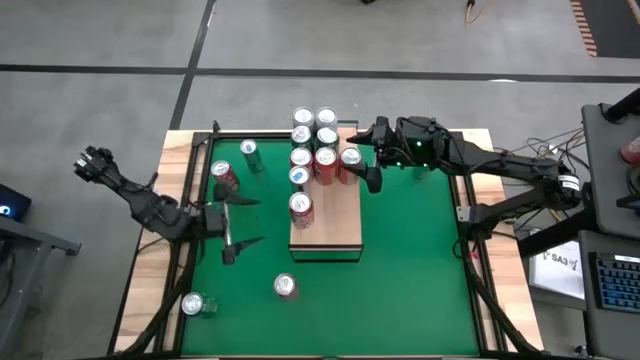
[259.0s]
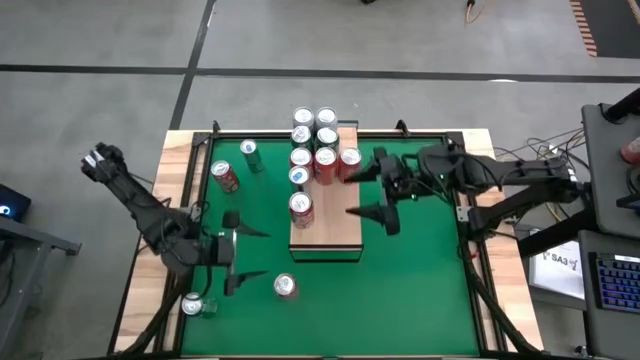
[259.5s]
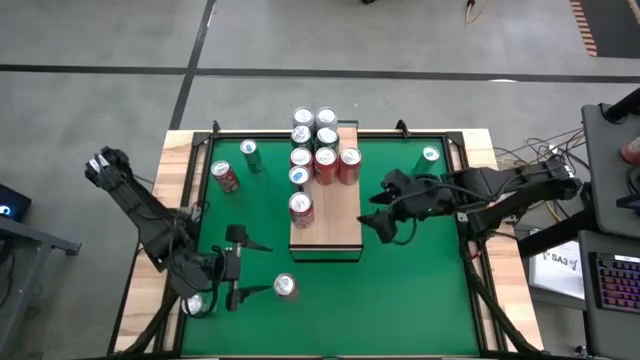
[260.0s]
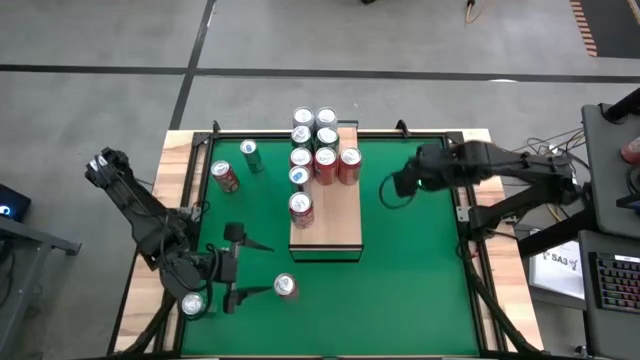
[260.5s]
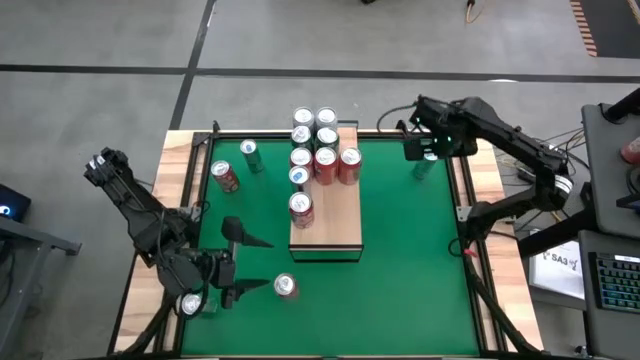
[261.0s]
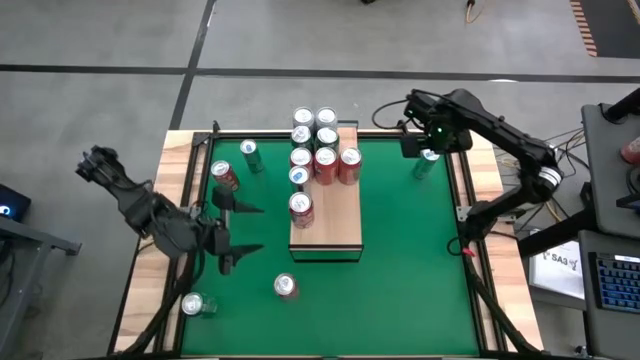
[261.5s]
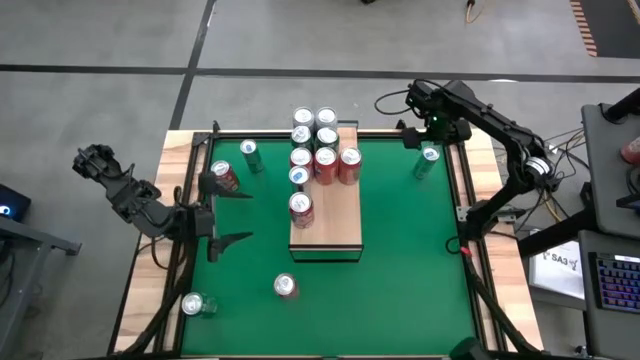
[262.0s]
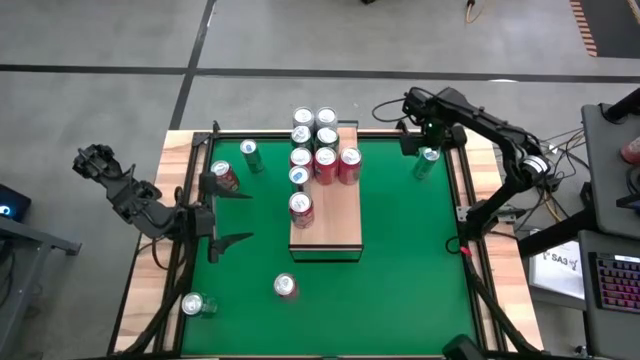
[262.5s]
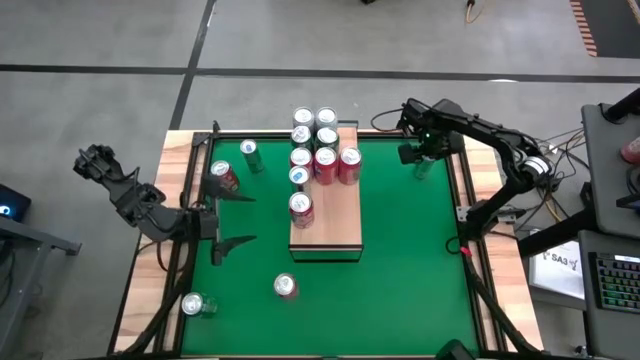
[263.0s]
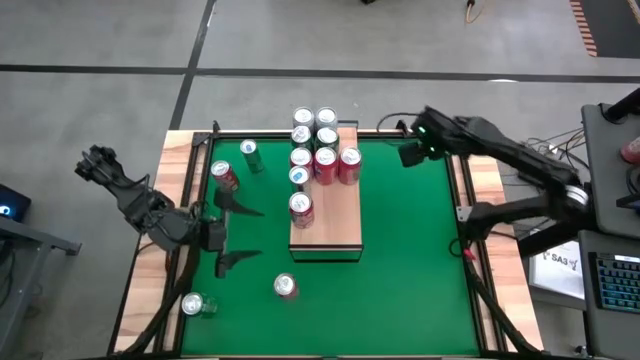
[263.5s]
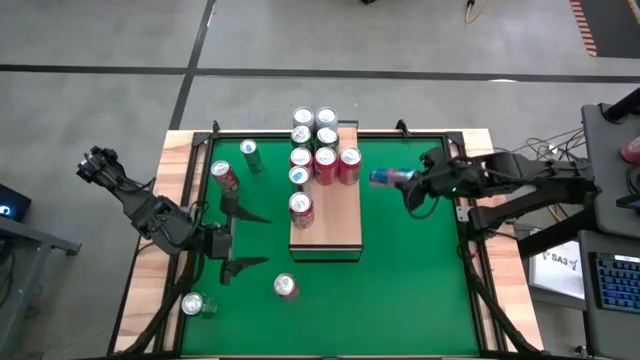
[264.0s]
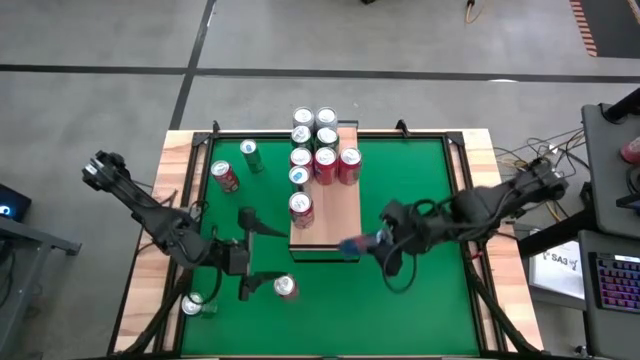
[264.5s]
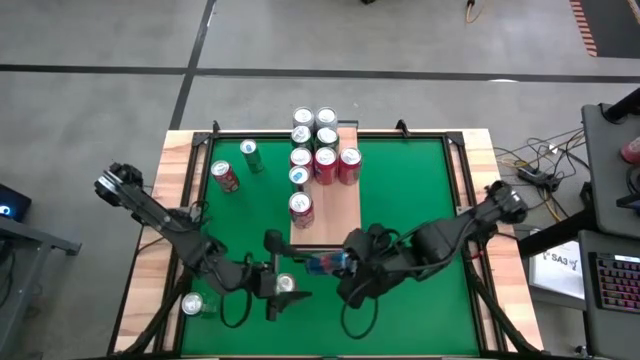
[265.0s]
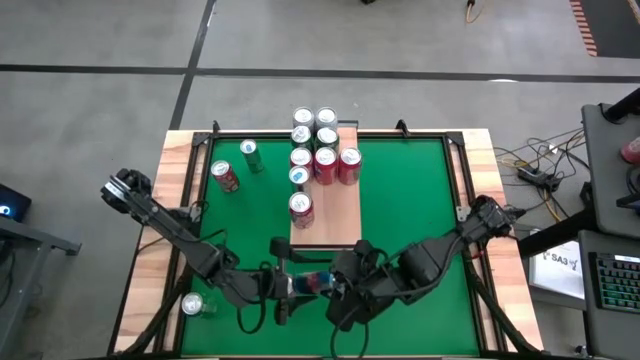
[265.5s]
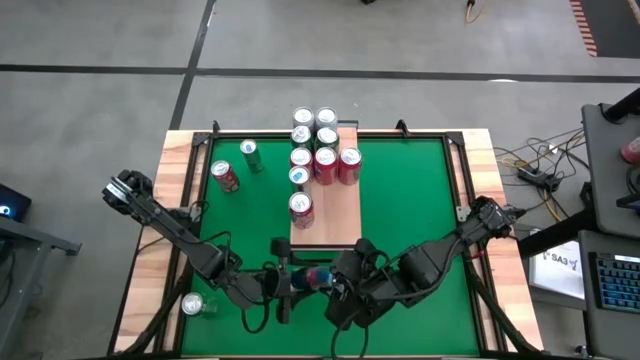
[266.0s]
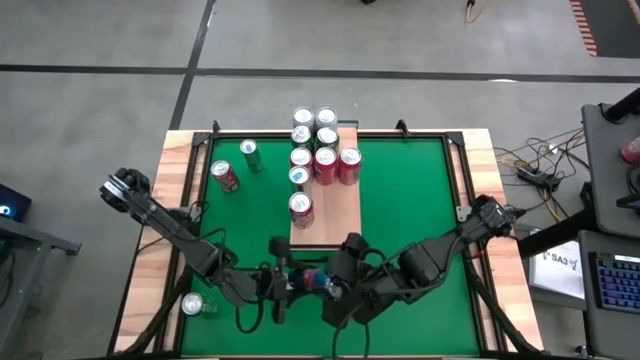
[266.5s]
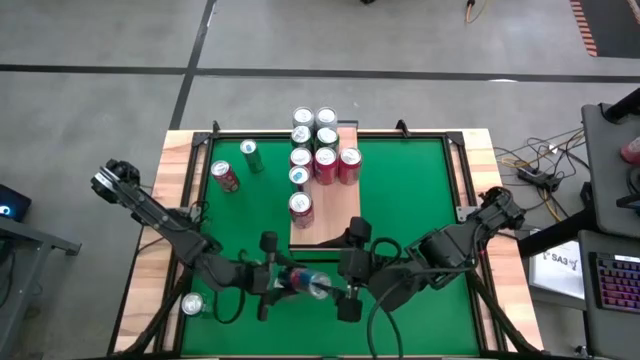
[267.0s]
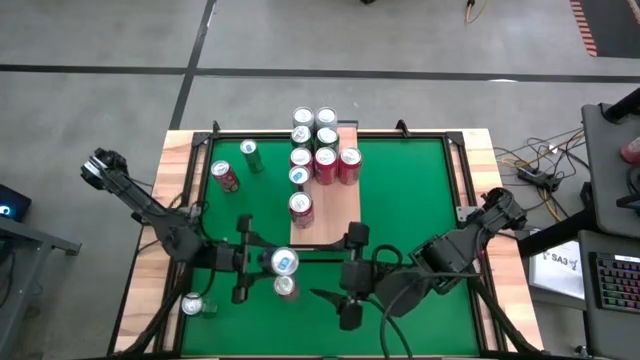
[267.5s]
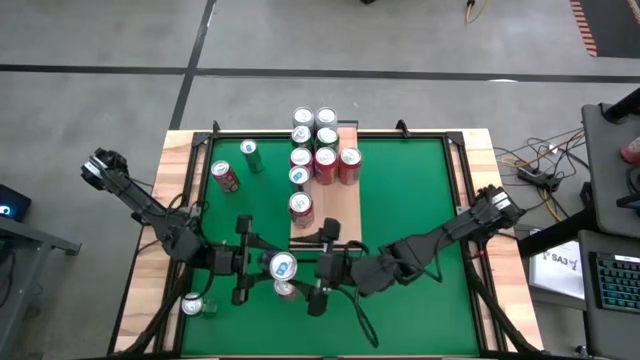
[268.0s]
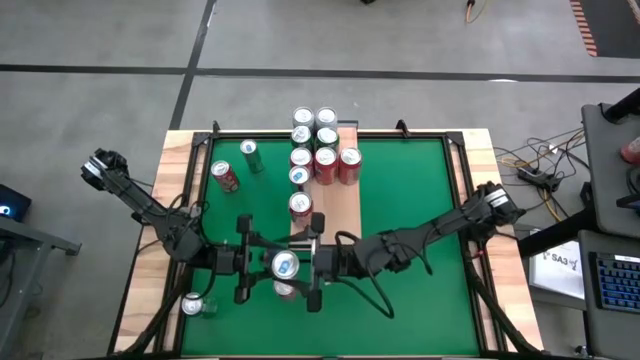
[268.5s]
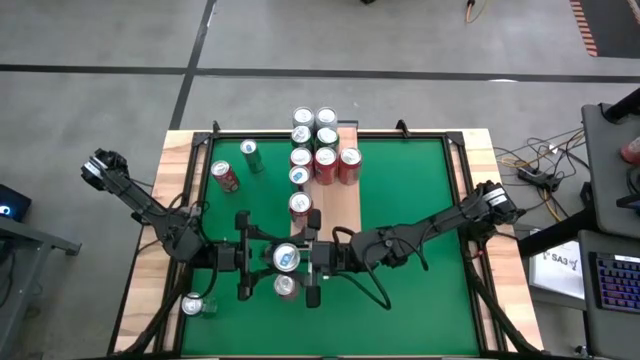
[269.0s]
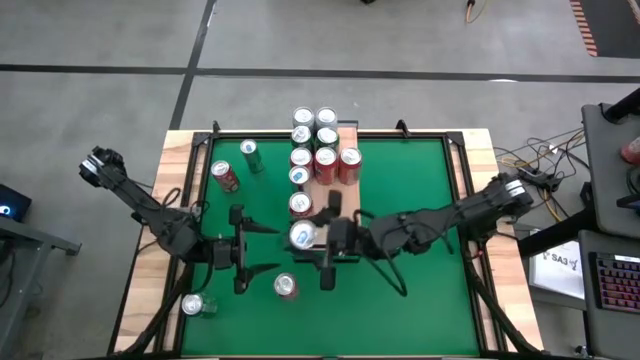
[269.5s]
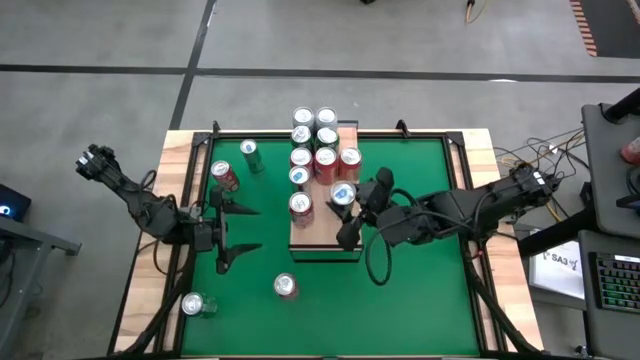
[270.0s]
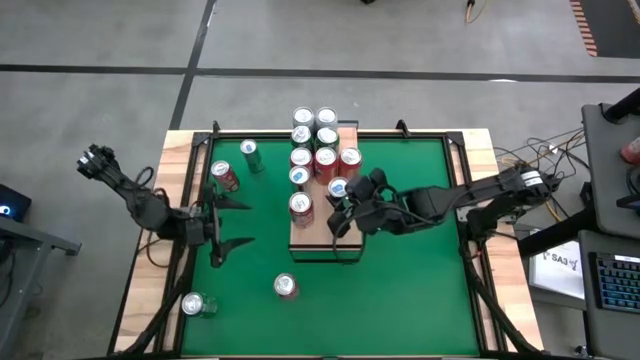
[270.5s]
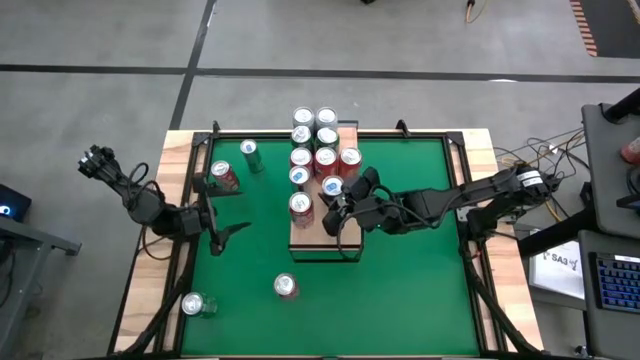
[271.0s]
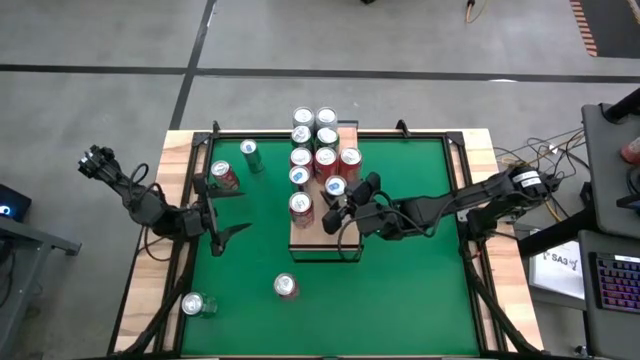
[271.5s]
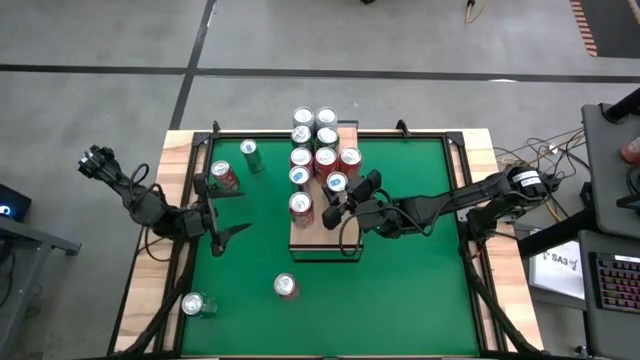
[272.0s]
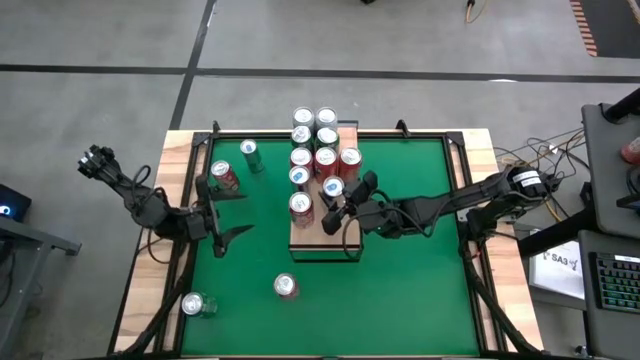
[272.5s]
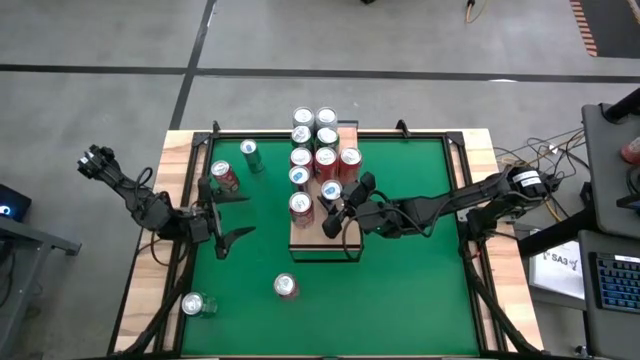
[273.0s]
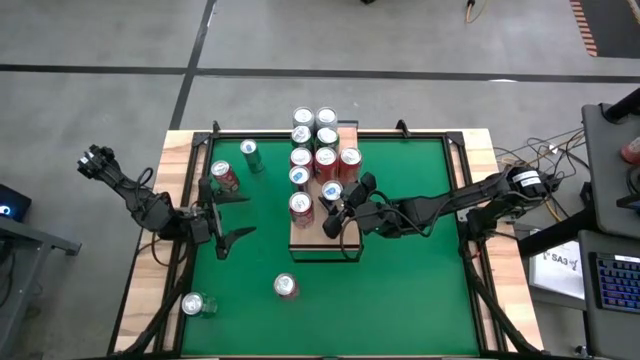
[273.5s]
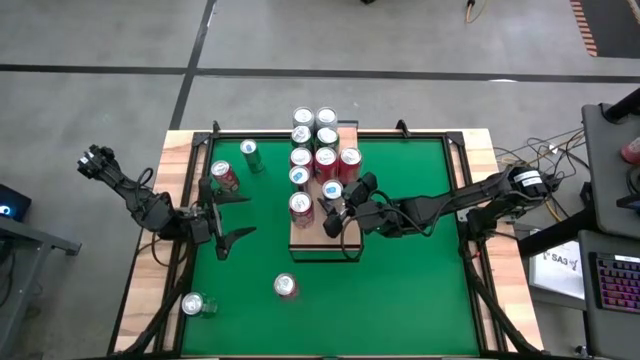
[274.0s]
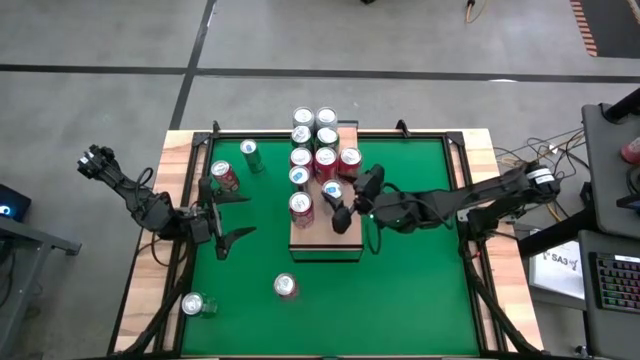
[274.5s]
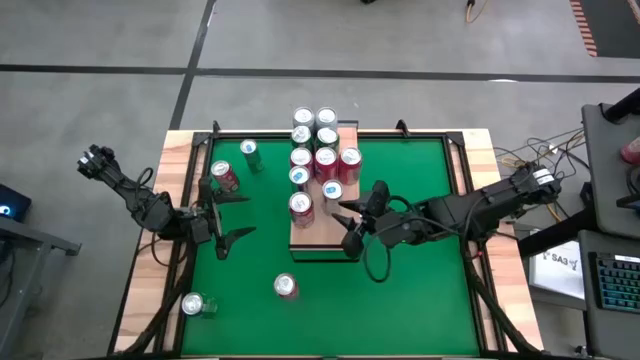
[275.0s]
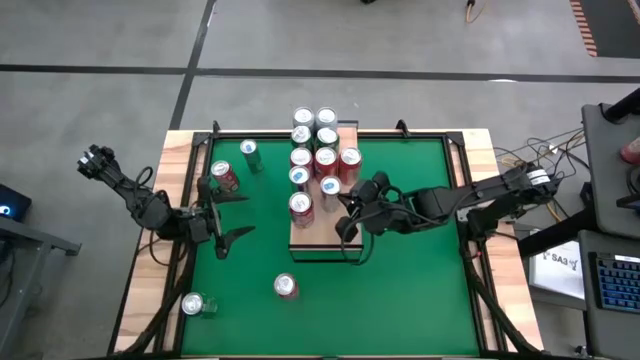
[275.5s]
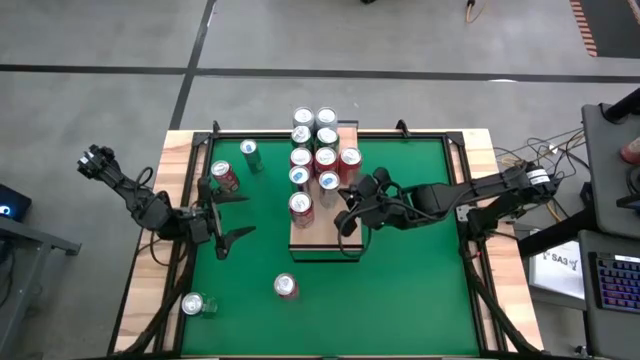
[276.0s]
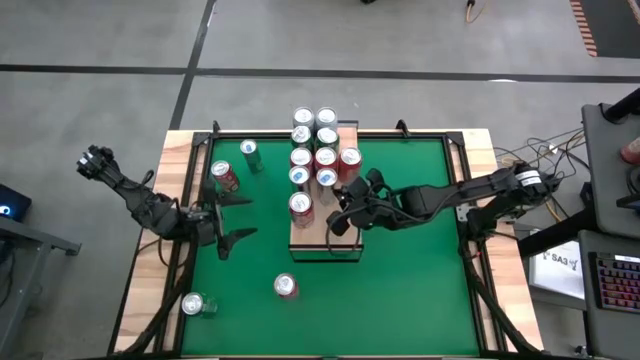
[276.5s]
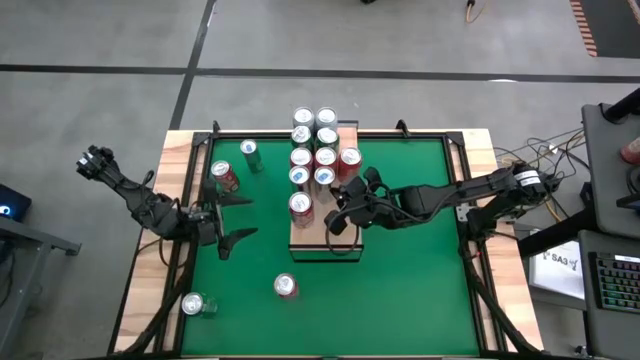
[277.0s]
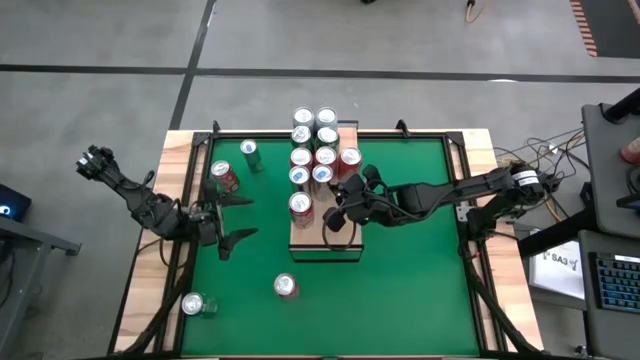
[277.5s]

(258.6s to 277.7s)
Task: Place canned beverage on shelf
Put the blue can on the shelf

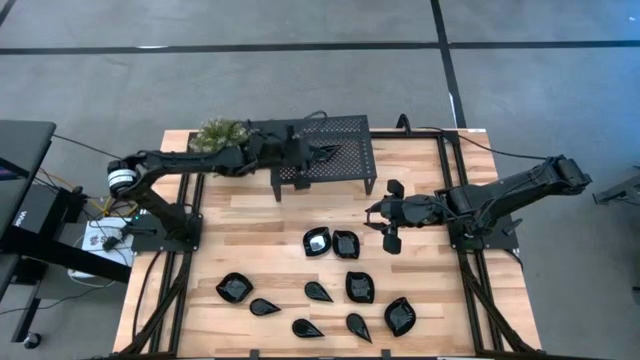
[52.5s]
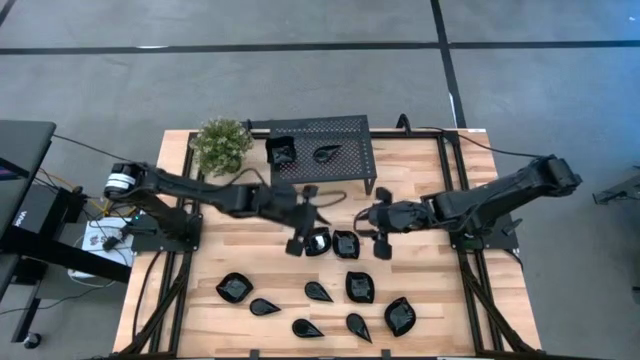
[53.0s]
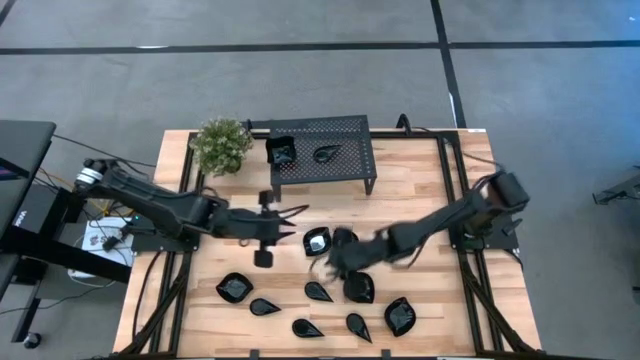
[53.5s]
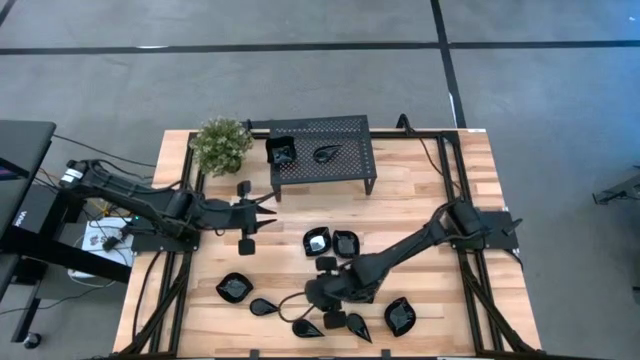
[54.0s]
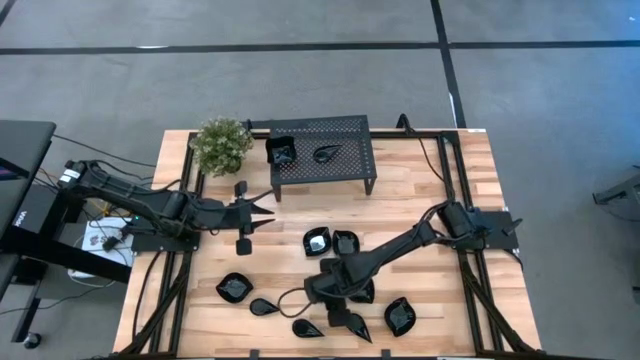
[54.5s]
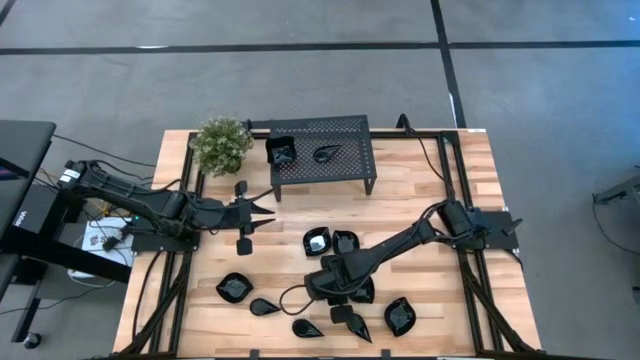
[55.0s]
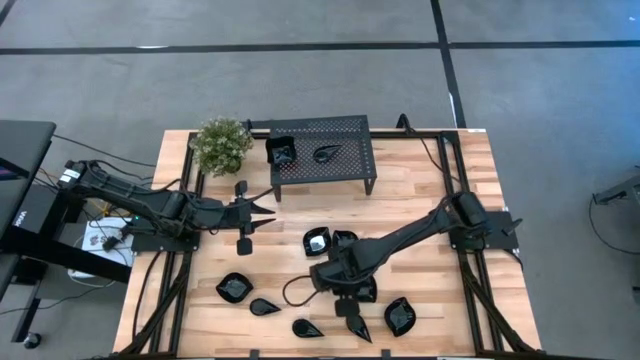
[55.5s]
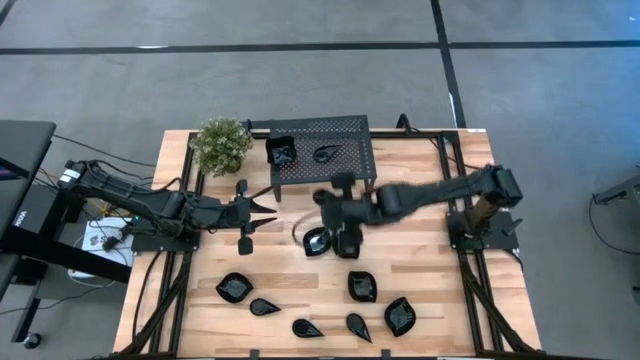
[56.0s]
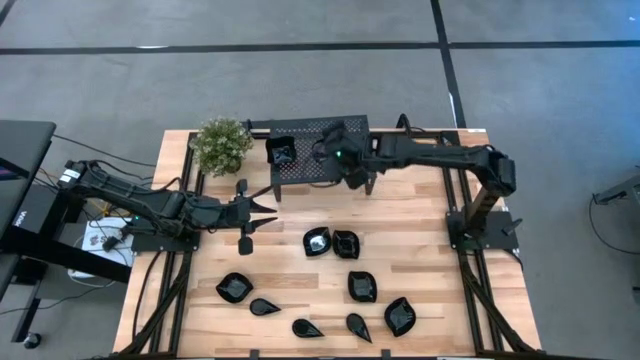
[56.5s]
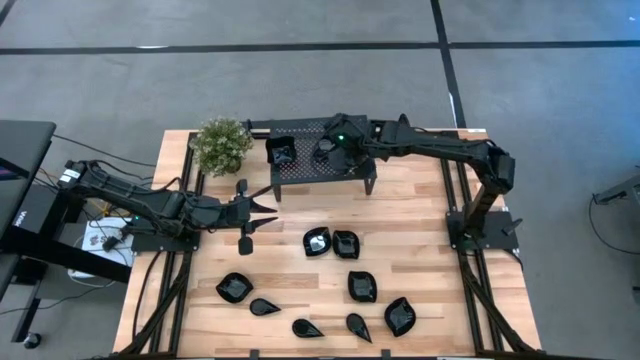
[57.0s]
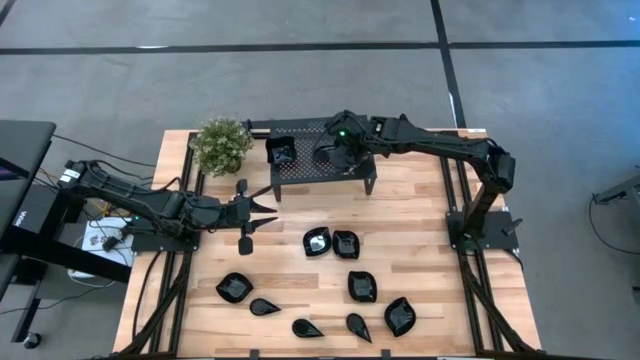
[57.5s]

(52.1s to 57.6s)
Task: Pick & Place Mini shaped plates
Stack the drop shaped plate on top of the drop shaped plate on the shelf
